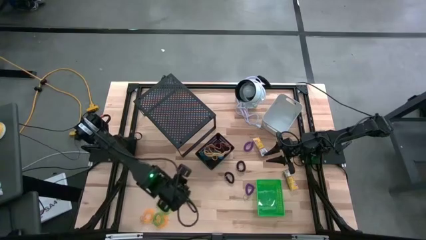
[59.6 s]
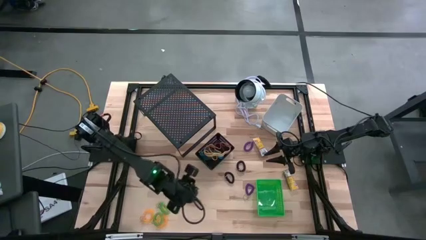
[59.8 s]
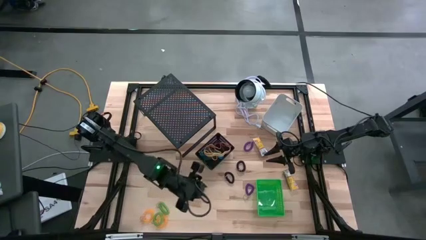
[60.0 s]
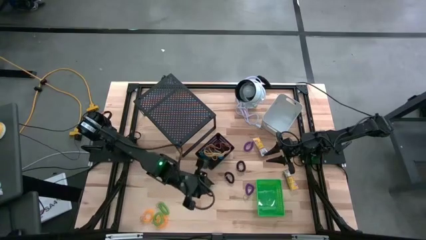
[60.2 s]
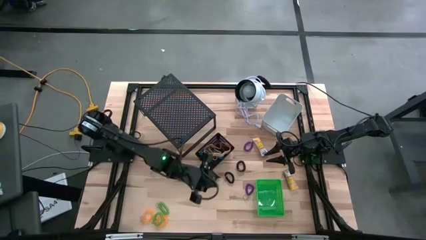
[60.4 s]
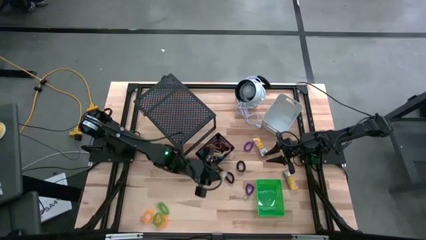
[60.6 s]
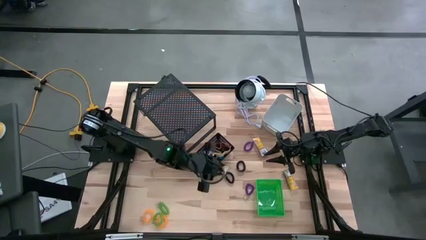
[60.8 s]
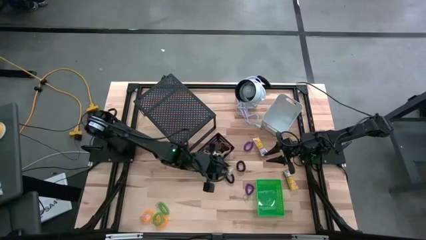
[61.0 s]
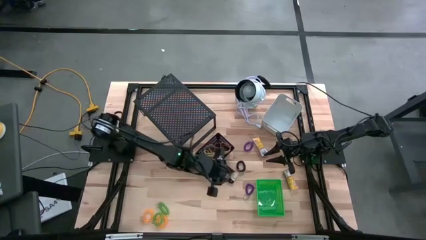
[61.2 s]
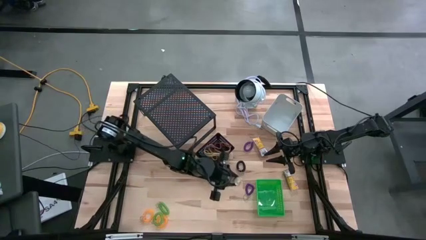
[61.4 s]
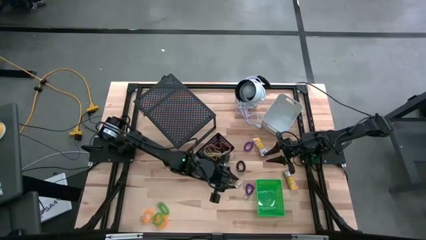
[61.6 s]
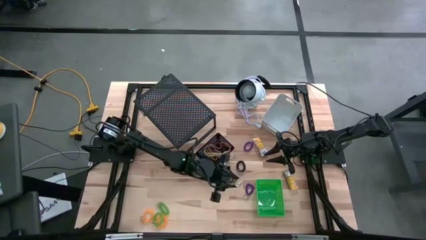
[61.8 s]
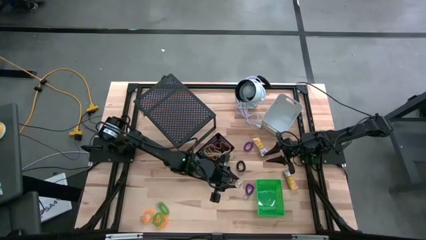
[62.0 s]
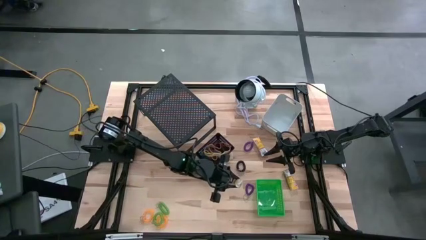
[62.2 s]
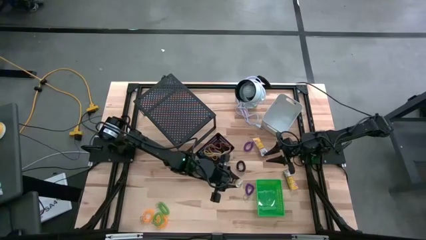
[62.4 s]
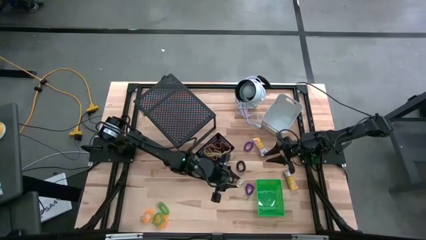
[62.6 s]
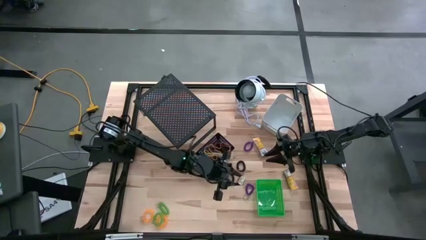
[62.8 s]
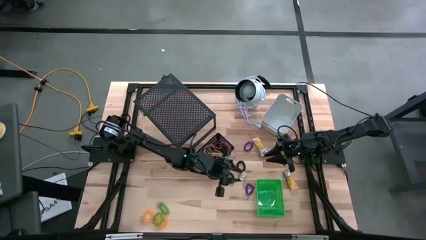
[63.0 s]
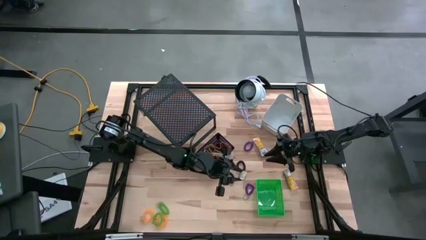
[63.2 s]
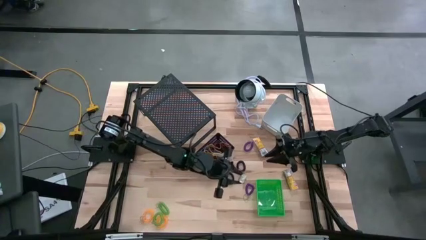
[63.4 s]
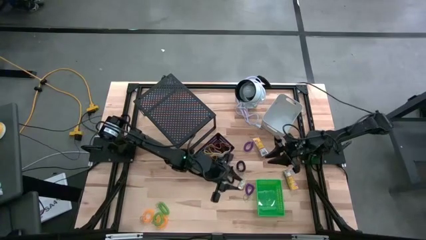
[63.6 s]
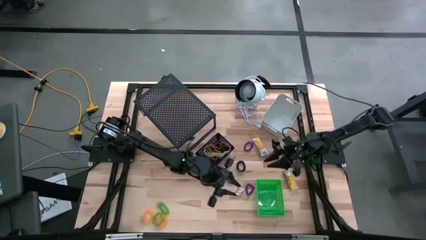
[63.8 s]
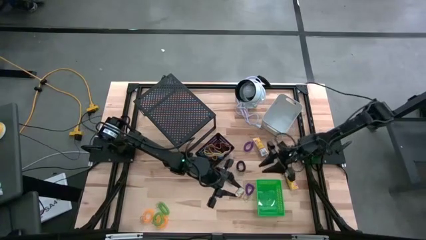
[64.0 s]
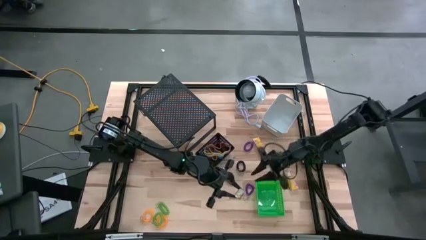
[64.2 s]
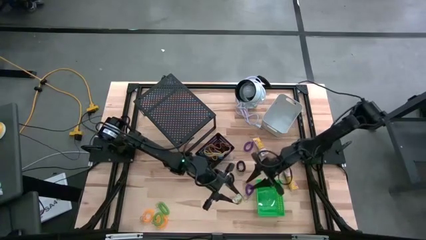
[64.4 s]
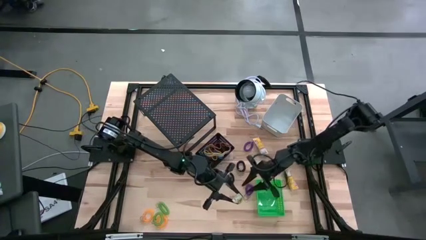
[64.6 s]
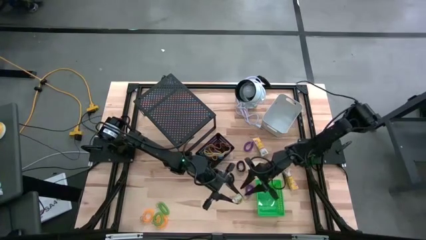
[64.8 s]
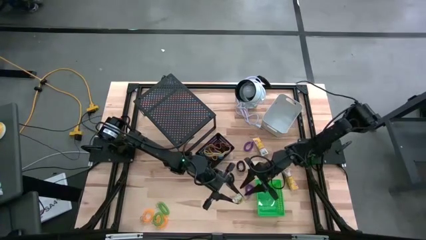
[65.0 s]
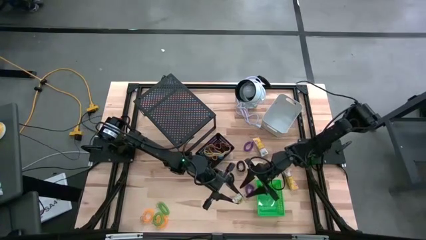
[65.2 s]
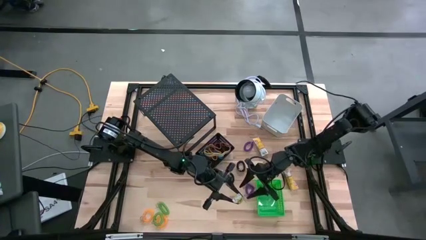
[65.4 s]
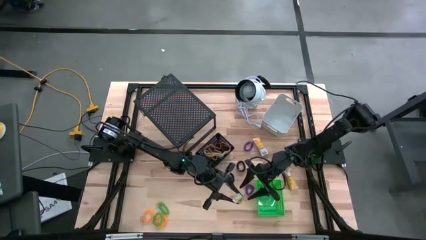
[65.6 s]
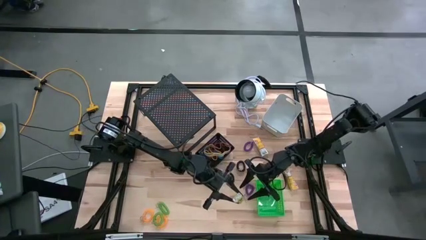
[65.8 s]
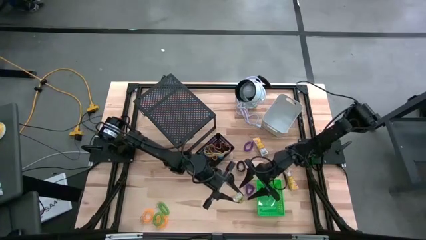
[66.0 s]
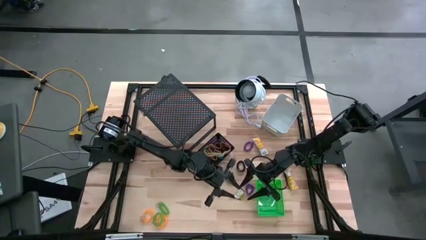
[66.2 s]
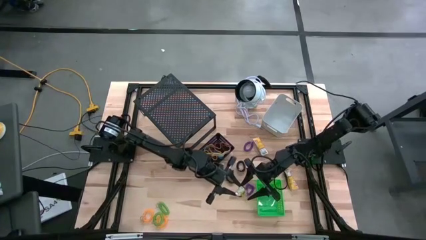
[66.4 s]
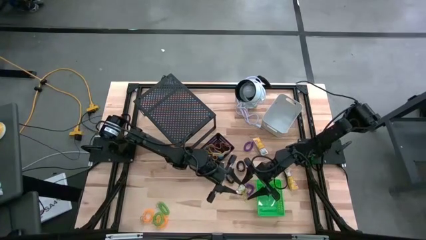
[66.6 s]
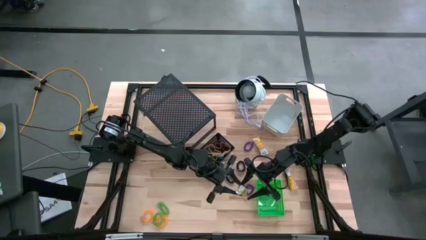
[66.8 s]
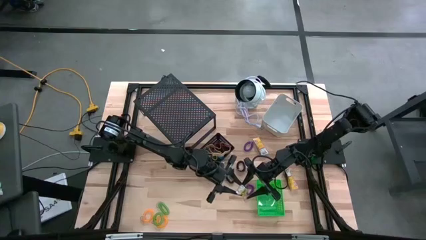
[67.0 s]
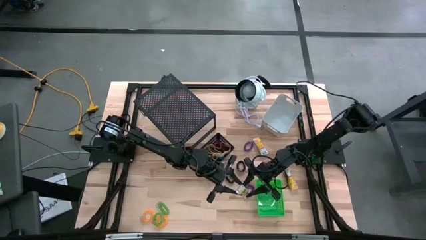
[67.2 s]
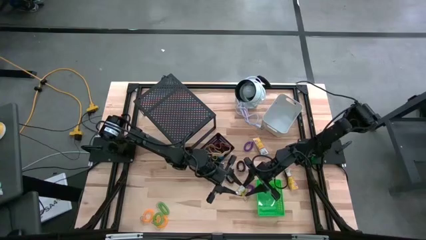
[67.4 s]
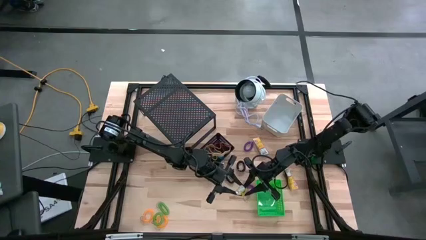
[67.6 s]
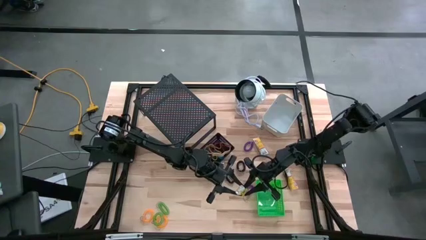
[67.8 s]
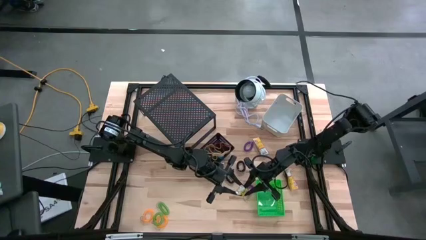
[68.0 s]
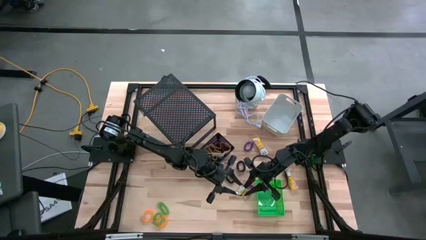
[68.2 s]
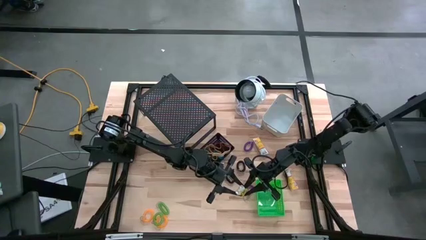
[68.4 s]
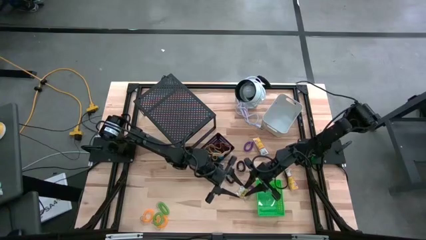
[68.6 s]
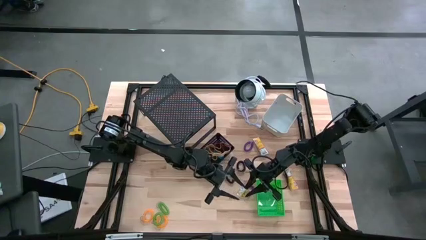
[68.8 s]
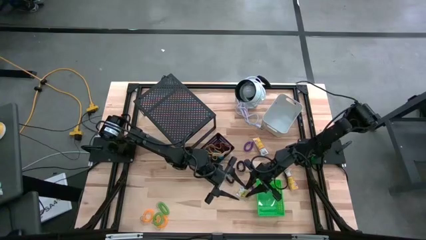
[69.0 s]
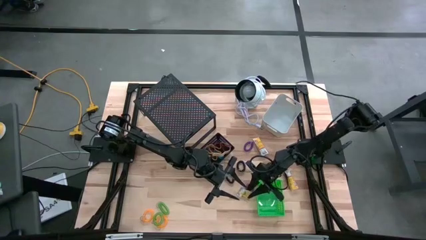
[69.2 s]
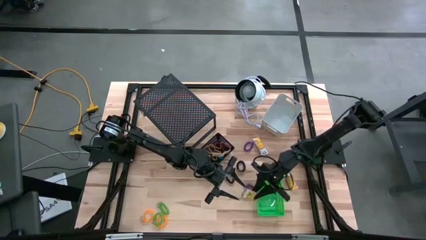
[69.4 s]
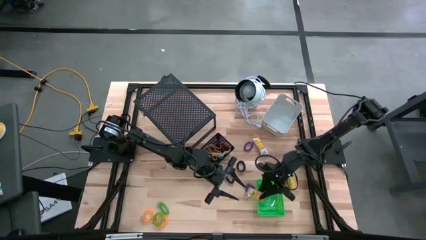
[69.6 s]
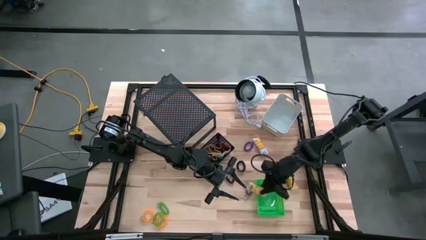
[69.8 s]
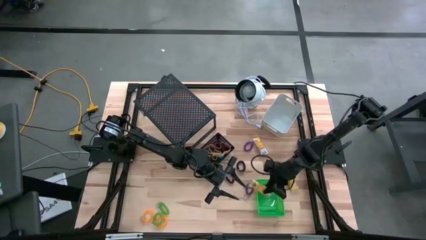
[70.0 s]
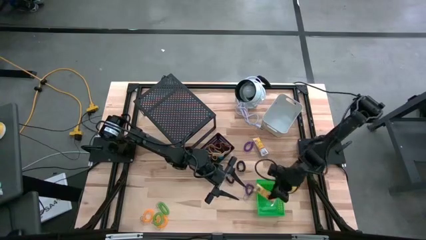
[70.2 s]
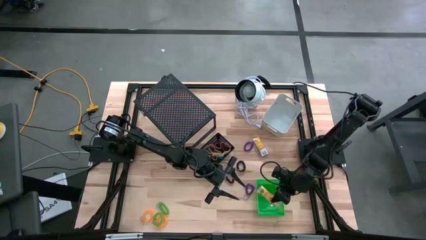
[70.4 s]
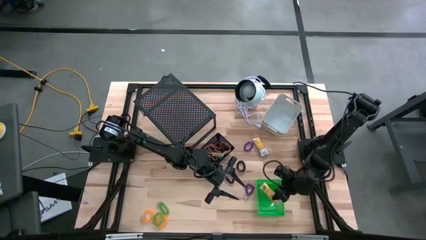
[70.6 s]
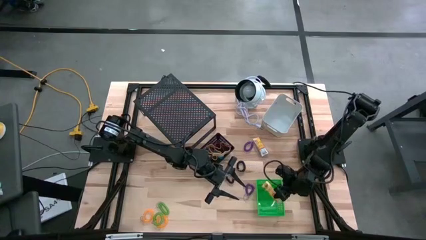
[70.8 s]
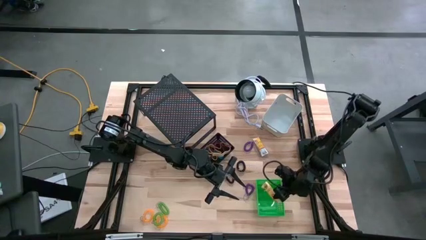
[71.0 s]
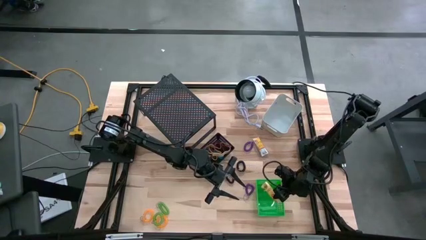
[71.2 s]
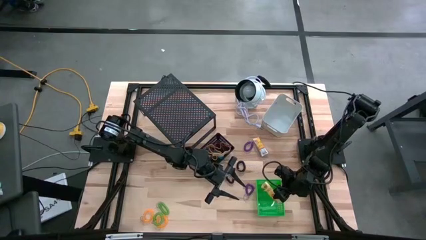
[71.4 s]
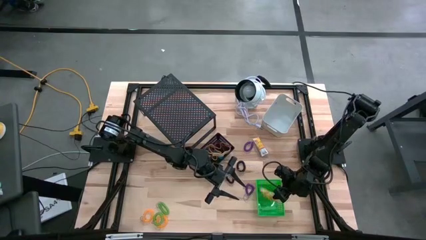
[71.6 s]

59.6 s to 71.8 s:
Task: Pick & Place Office Desk Supplies
Put the bottom left crayon box into the green bin

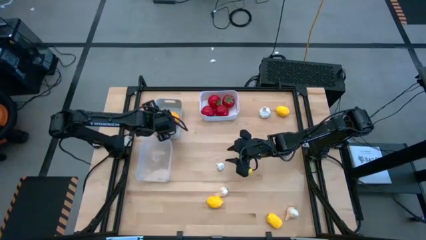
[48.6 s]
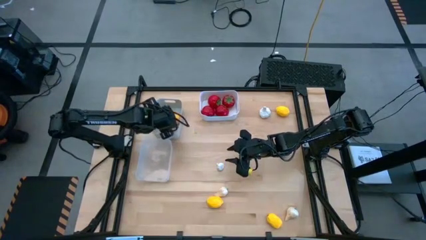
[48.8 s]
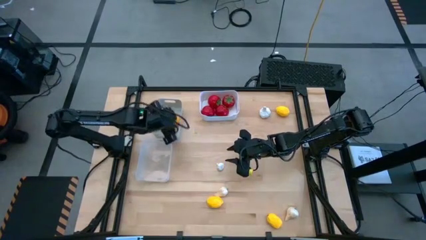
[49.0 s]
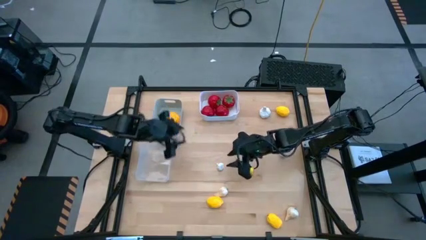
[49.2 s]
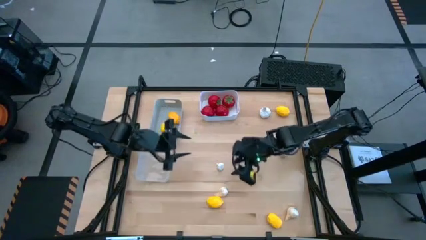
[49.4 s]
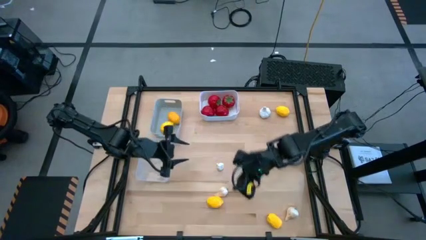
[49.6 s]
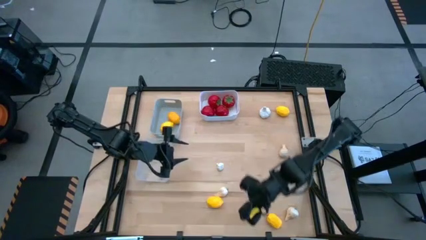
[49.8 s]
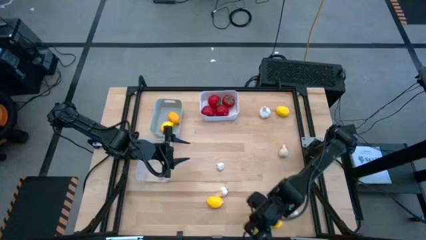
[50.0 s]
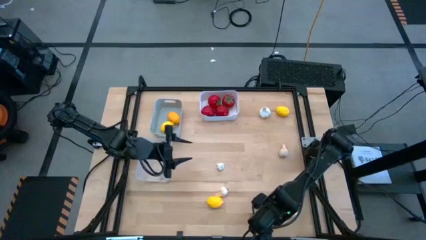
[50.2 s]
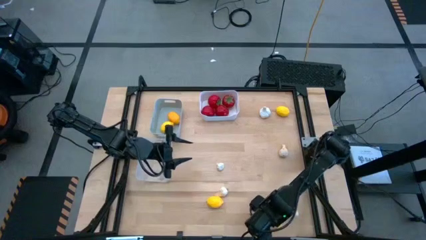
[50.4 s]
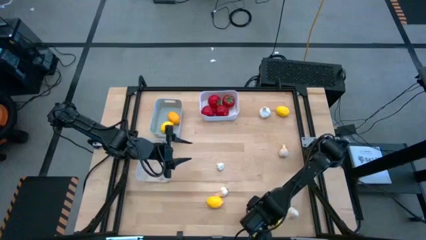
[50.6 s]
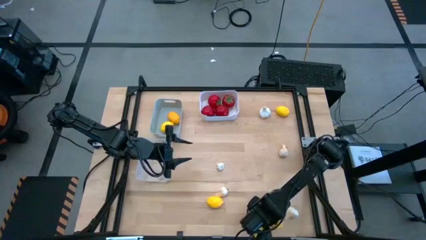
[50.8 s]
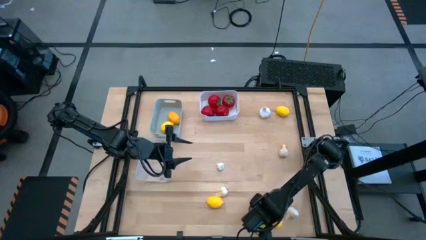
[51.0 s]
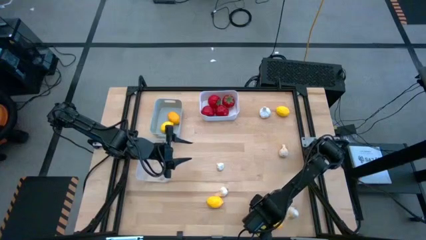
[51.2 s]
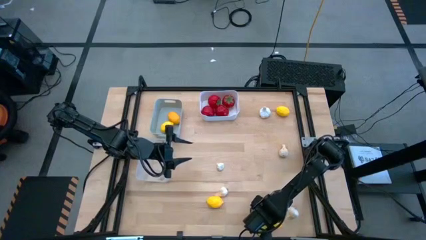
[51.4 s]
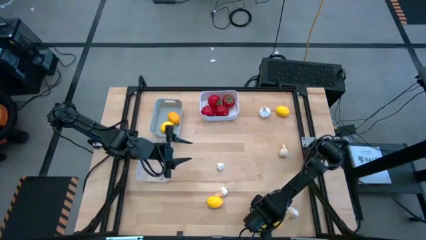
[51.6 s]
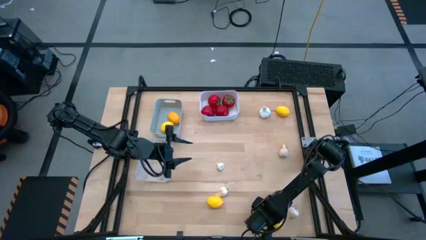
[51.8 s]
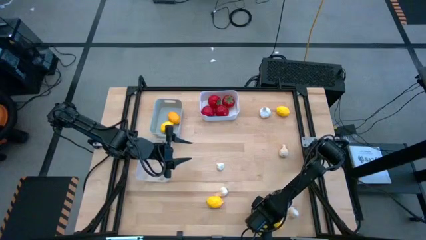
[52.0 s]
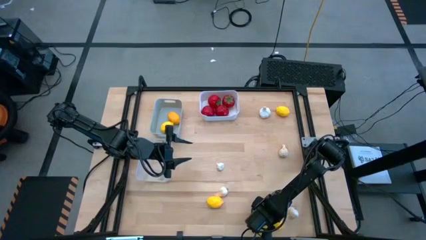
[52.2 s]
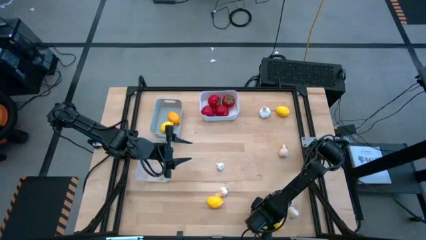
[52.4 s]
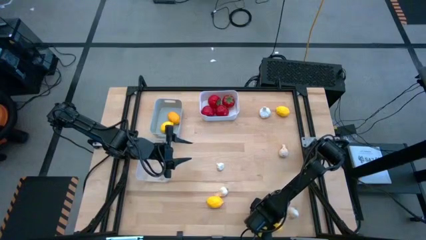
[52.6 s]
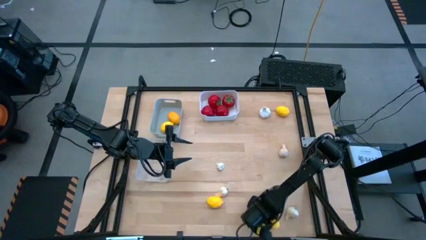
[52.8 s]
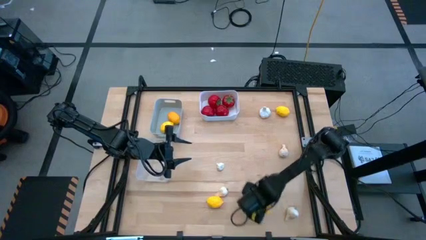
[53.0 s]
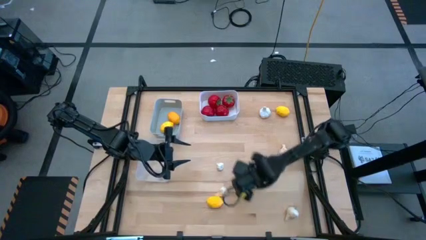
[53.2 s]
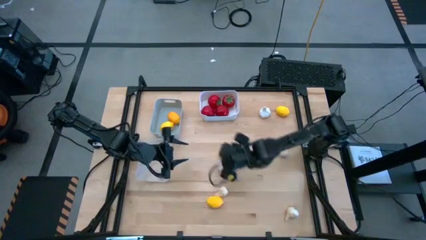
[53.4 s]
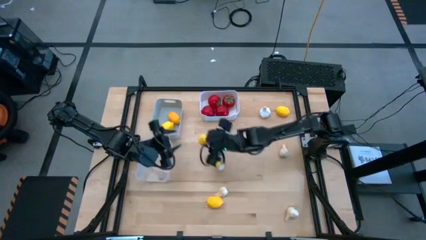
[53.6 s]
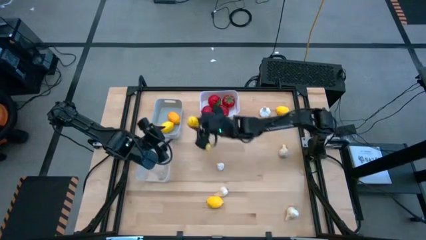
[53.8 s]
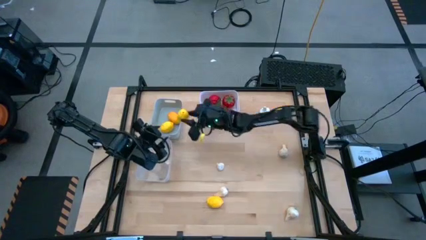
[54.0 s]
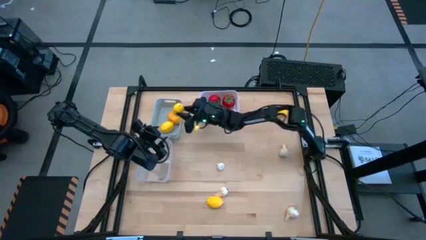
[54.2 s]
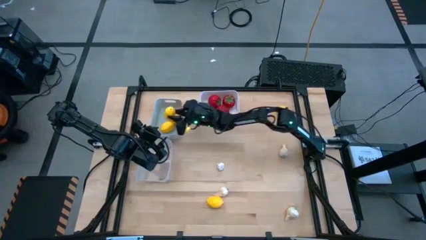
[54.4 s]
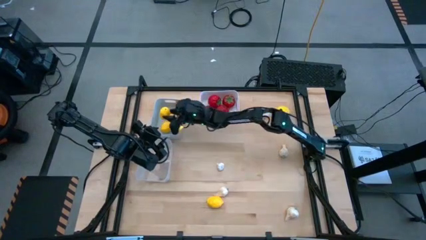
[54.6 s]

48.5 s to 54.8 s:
Task: Sort produce into baskets
Put the yellow lemon into the gray bin
